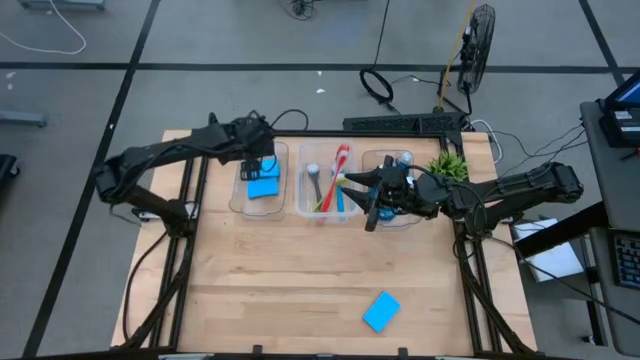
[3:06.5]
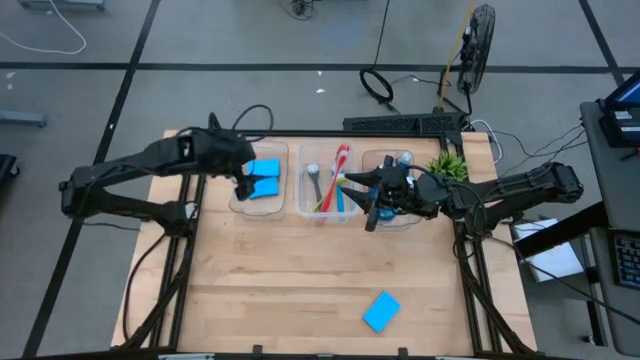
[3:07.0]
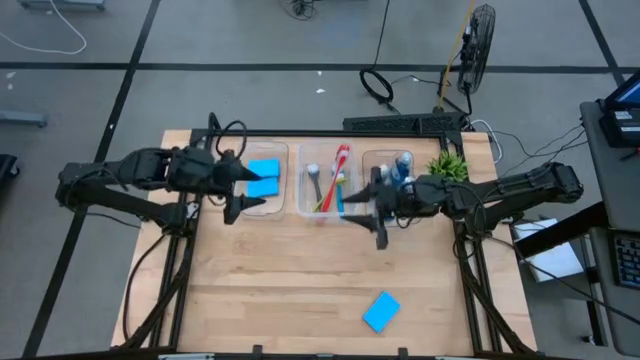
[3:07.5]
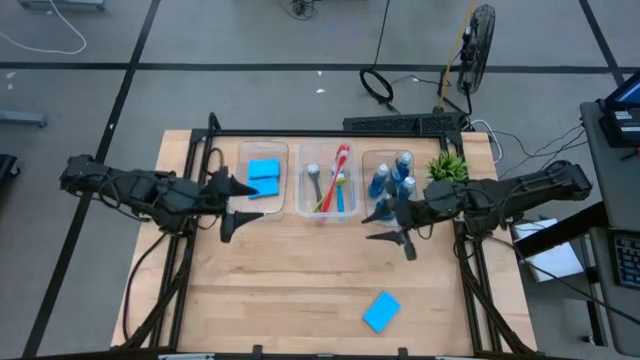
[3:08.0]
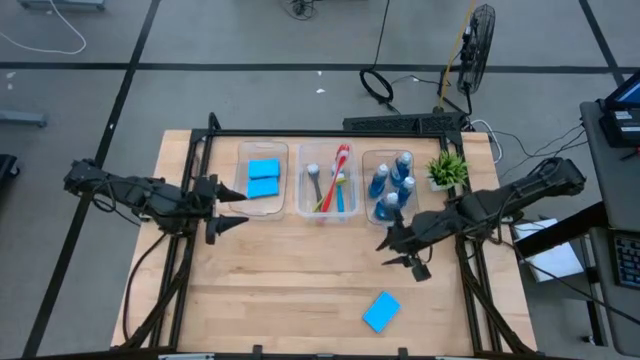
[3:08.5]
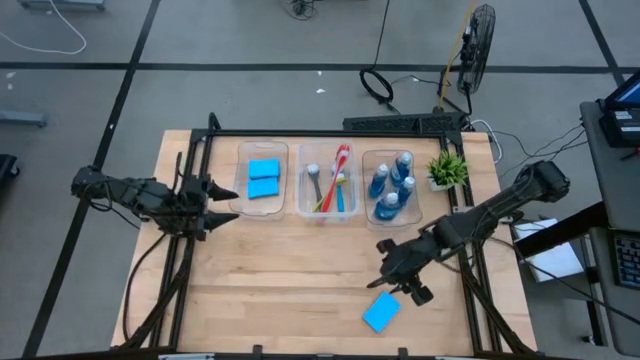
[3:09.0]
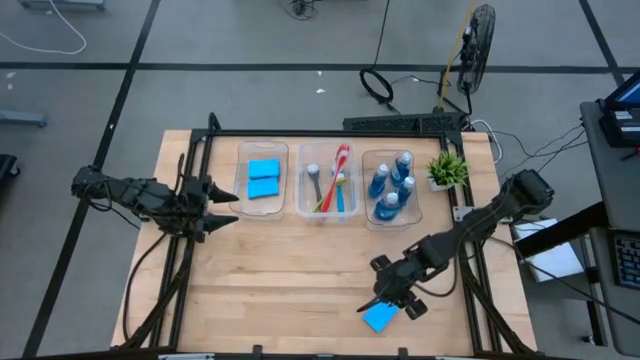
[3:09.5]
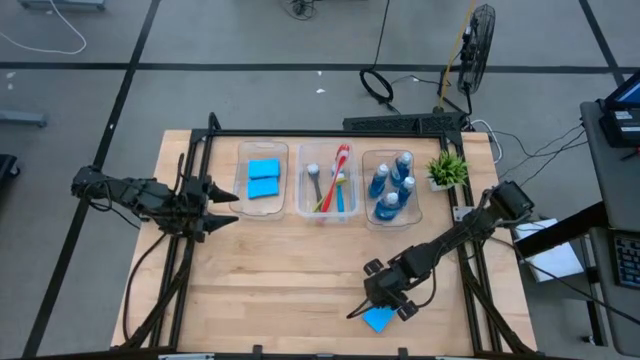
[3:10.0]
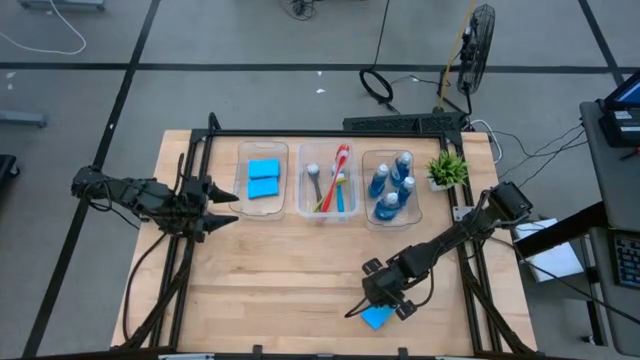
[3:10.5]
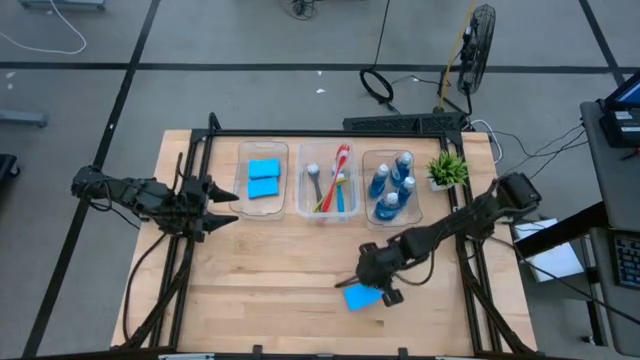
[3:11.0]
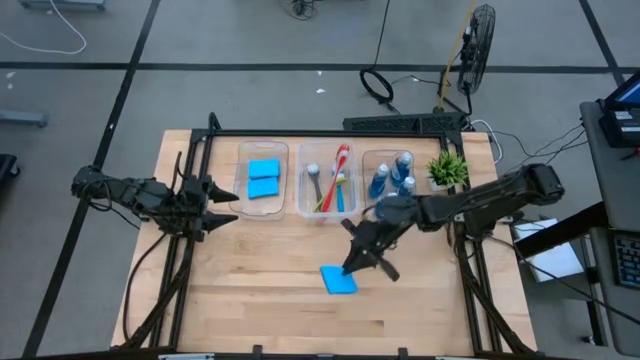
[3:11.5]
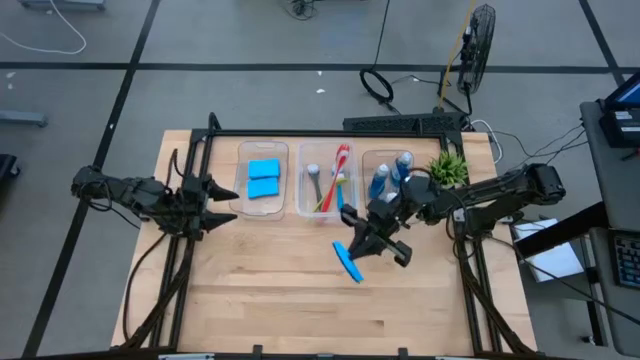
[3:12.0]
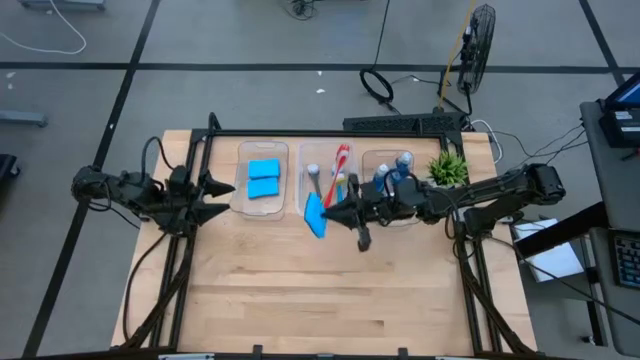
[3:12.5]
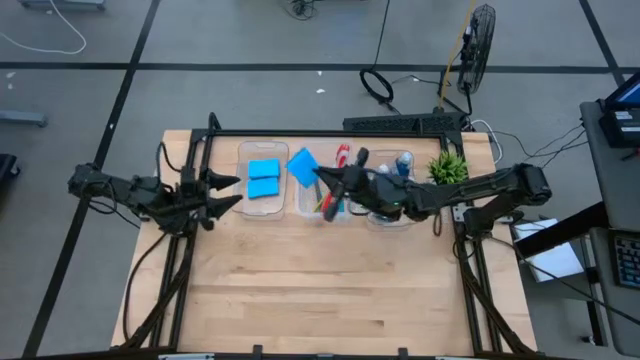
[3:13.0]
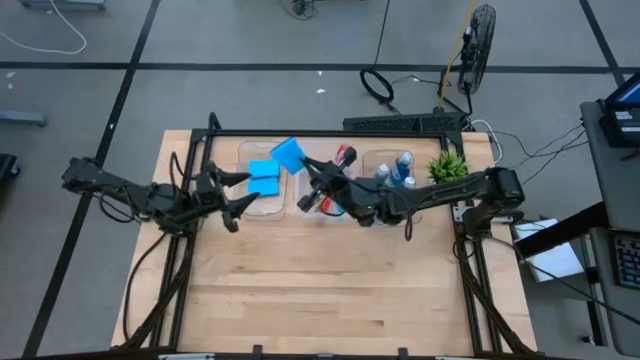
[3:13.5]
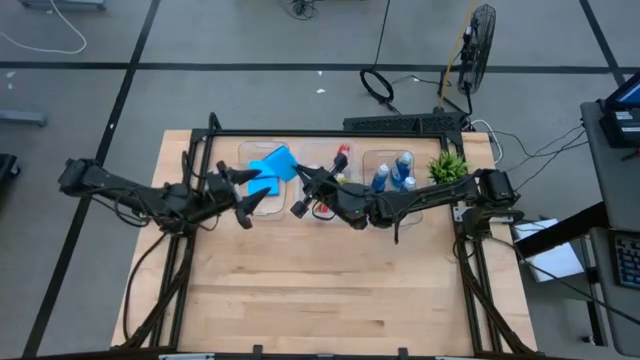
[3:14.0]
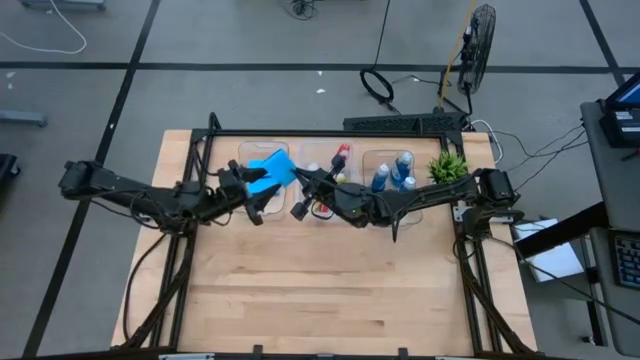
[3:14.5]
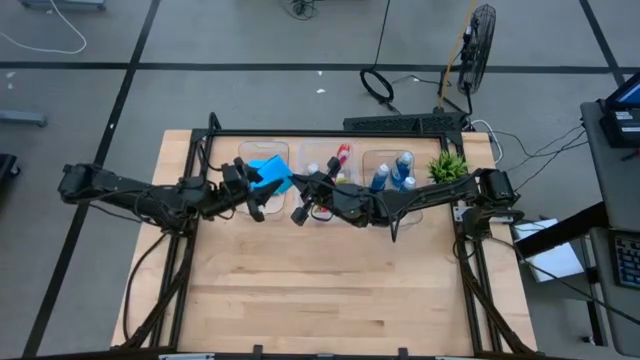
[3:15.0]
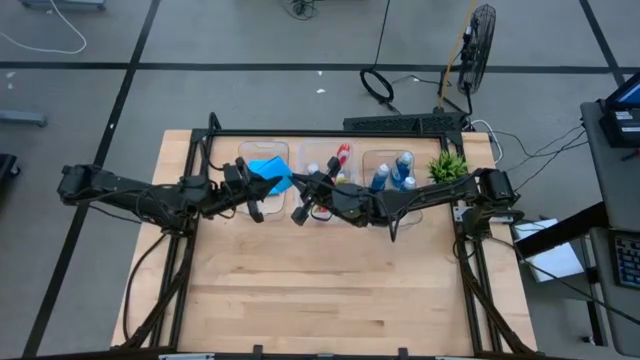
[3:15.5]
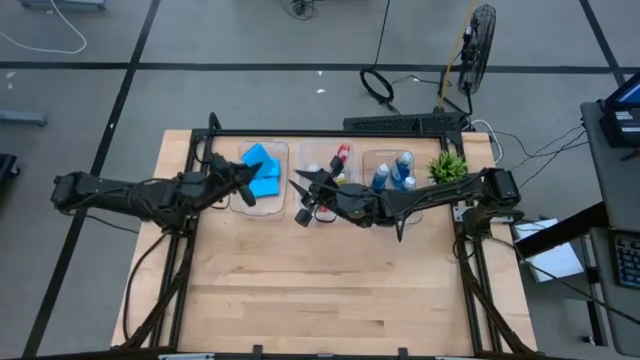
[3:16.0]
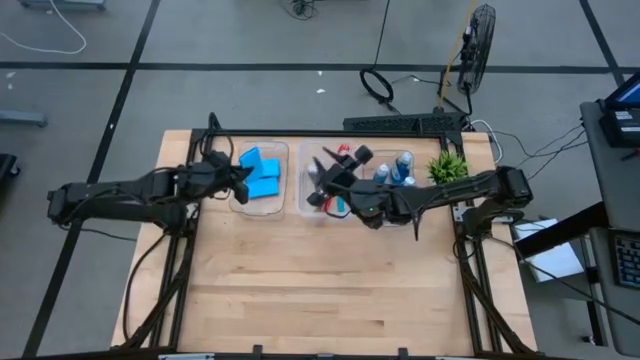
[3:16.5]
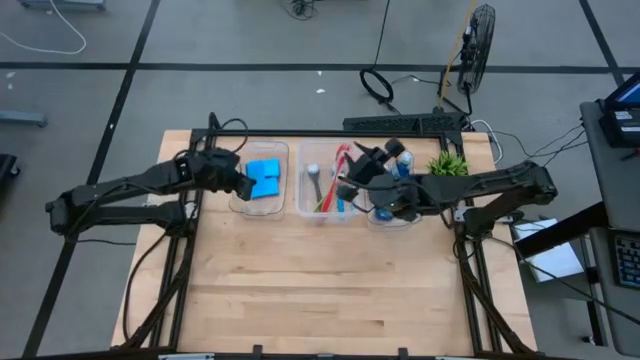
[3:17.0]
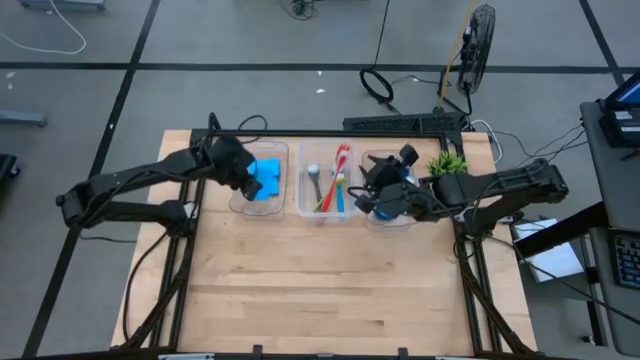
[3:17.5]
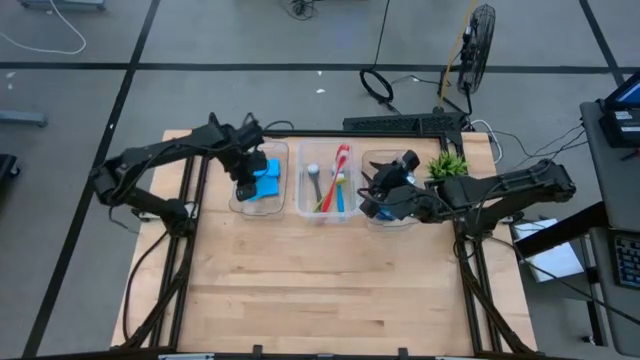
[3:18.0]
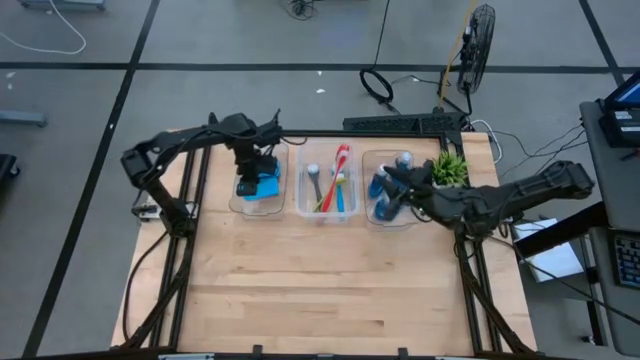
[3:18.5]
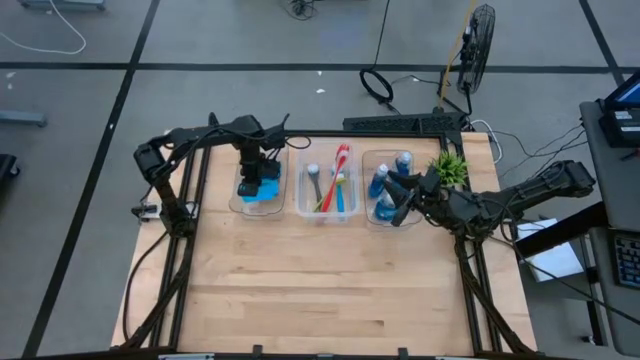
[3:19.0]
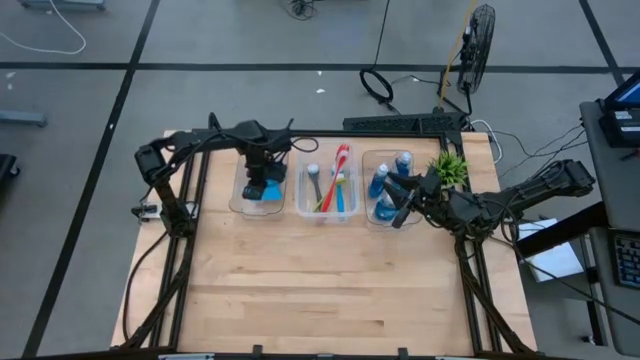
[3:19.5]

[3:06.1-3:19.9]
Task: Pick & Place Kitchen Sink Supplies
Put the blue sponge into the left transparent bin

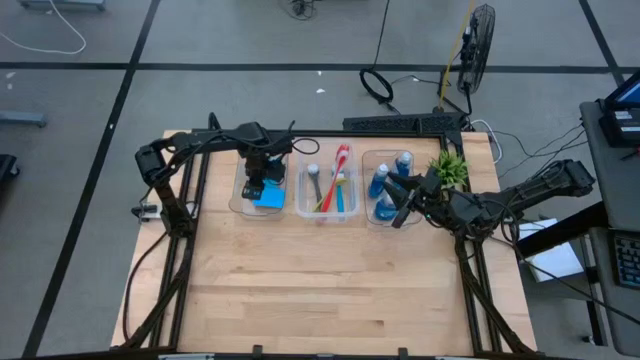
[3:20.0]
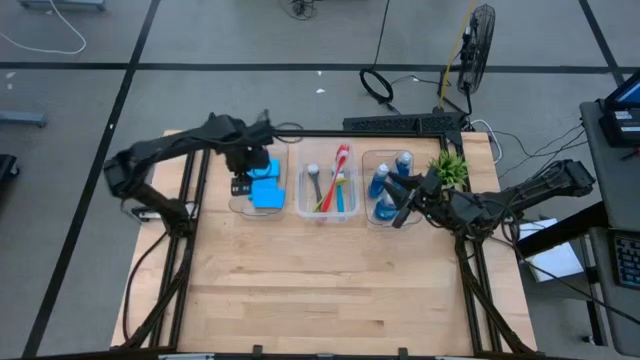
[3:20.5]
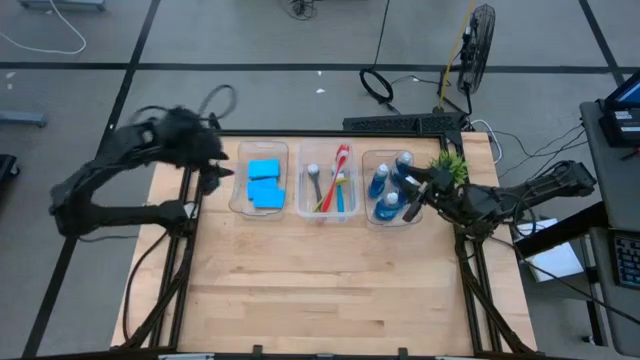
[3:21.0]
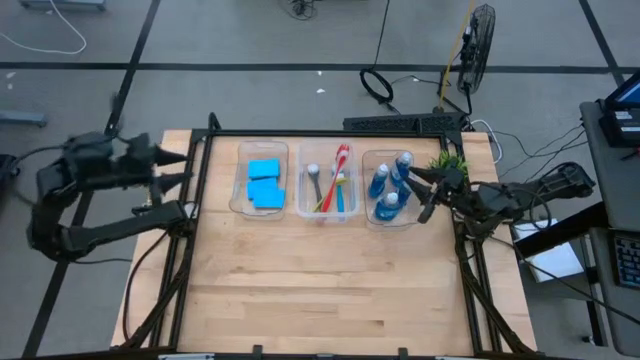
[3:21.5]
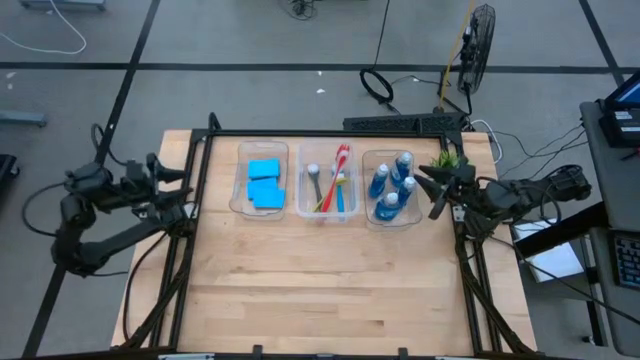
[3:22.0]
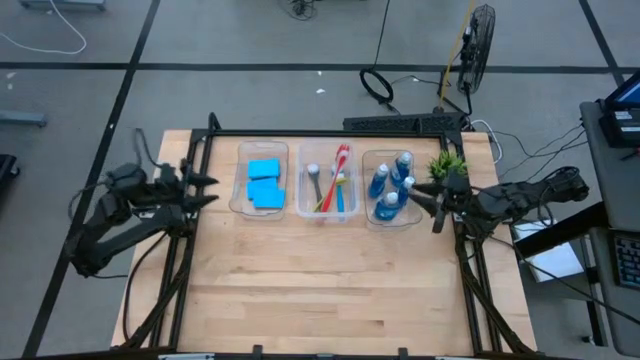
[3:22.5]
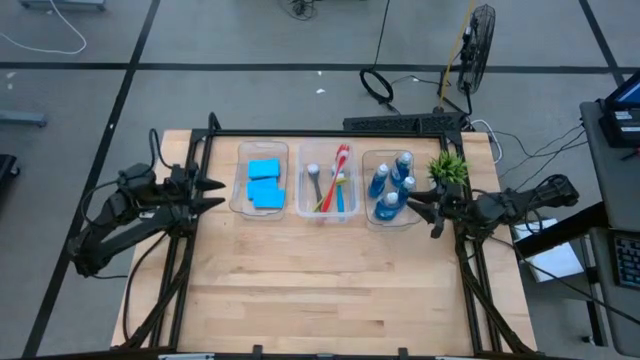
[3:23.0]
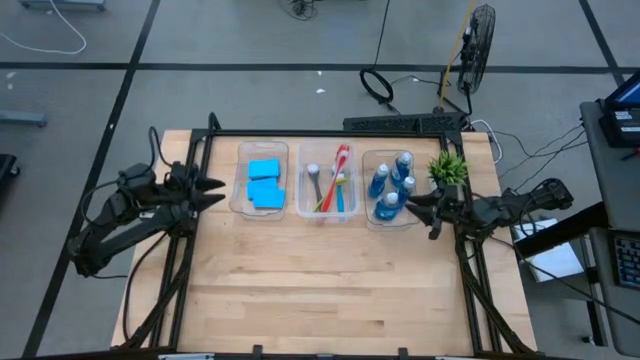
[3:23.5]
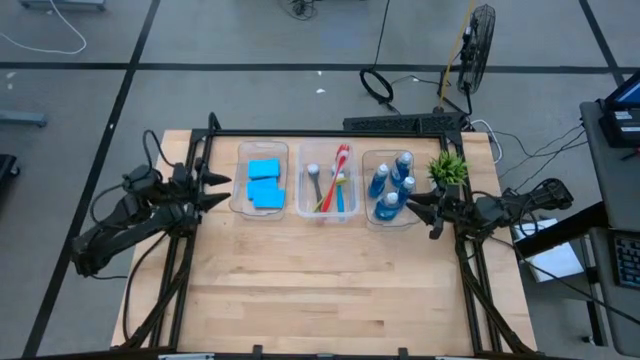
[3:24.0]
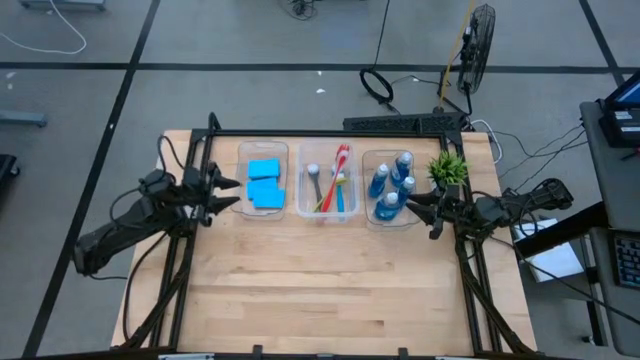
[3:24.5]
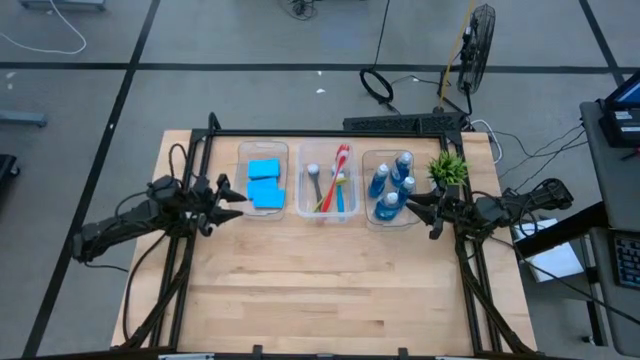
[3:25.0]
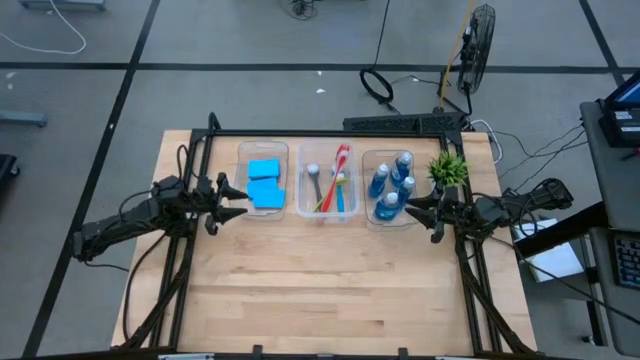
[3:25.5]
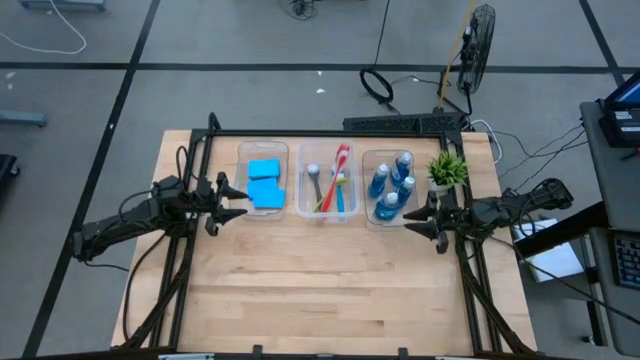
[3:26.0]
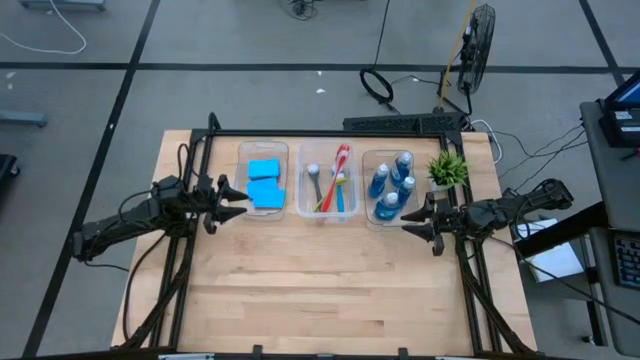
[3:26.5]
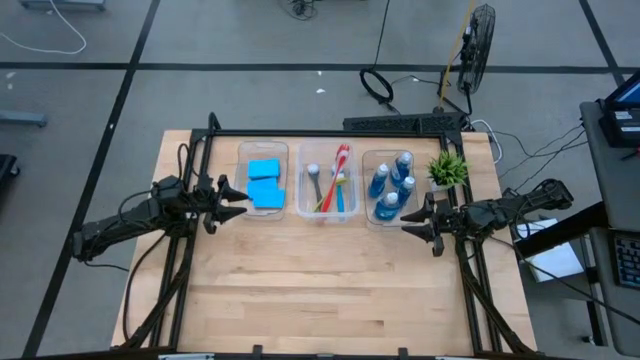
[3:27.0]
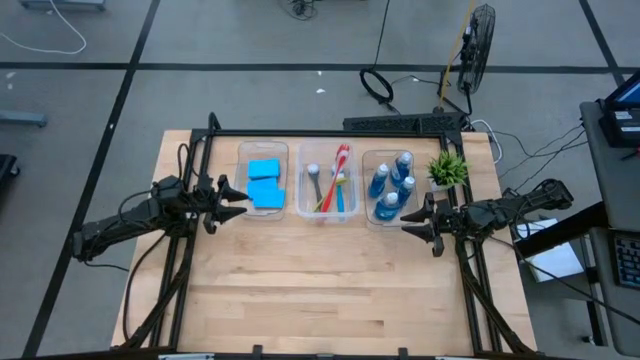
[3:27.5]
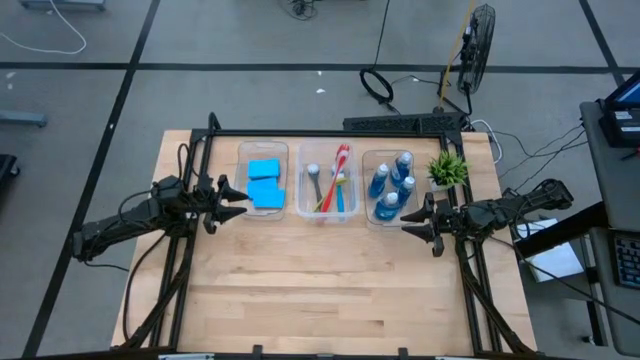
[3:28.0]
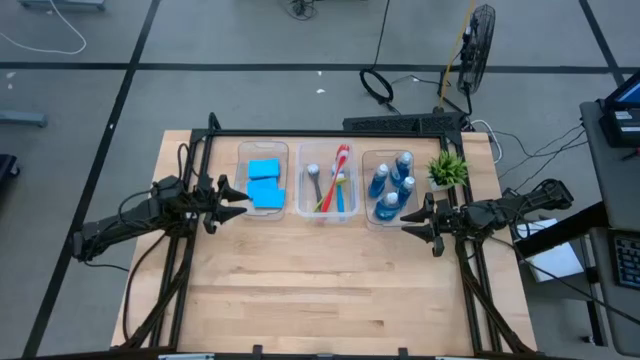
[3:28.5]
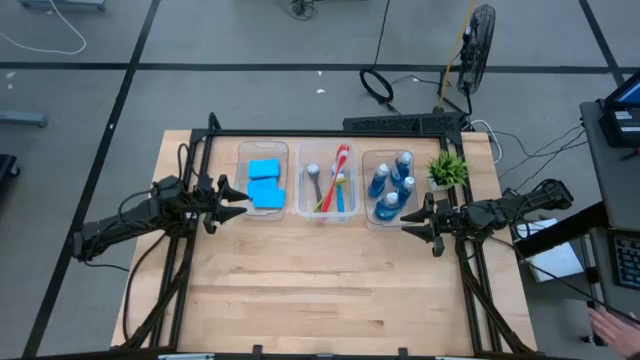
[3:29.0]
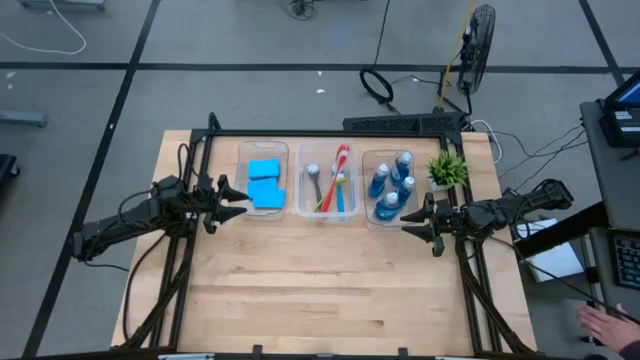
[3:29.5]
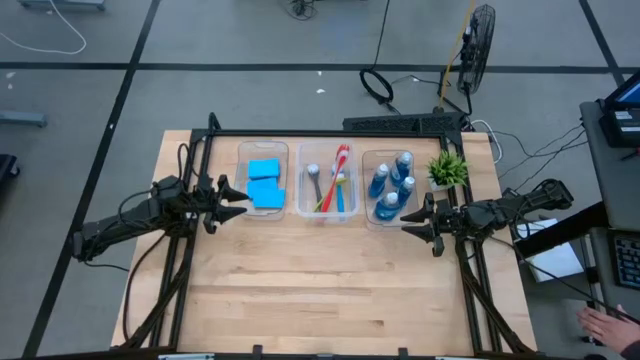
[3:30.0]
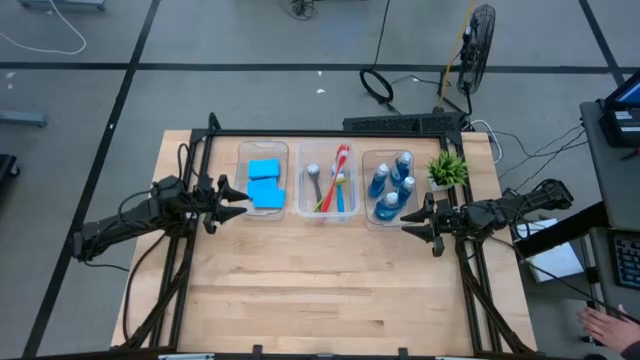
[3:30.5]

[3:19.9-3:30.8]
Return to Home Position
